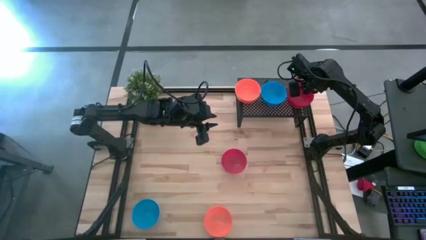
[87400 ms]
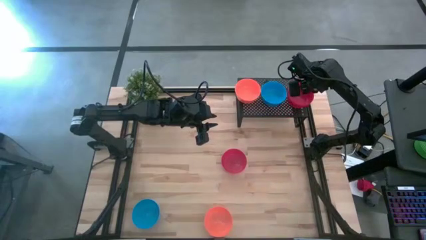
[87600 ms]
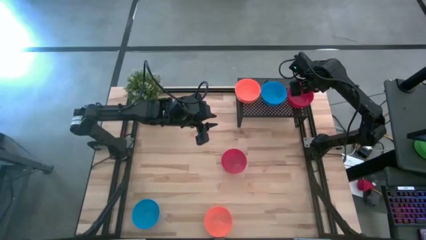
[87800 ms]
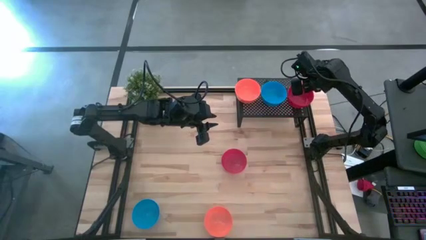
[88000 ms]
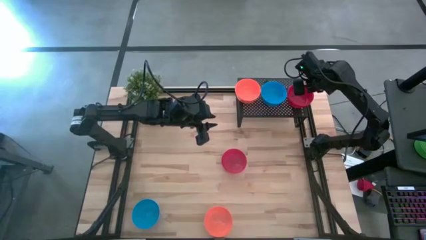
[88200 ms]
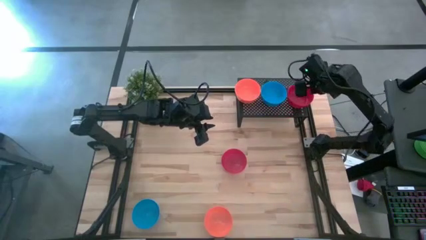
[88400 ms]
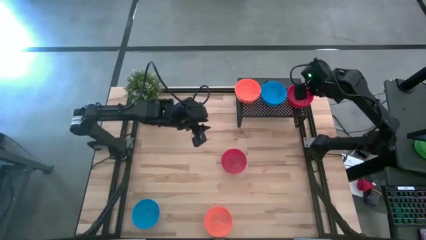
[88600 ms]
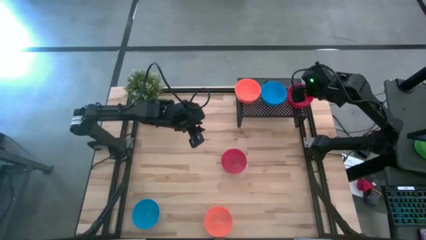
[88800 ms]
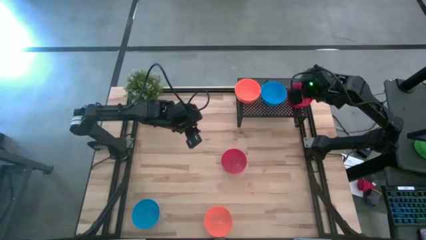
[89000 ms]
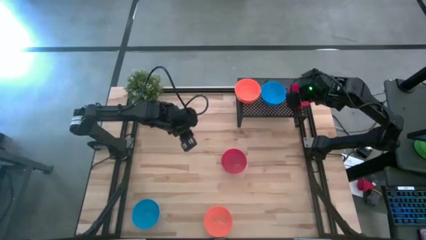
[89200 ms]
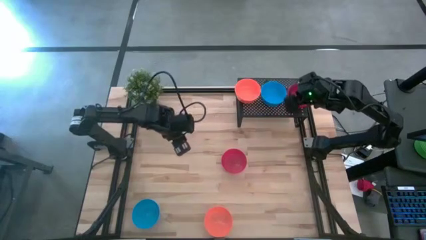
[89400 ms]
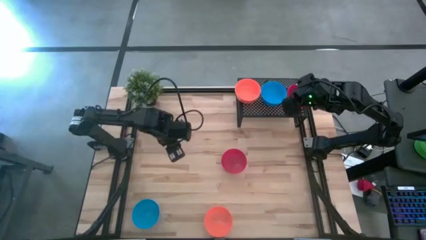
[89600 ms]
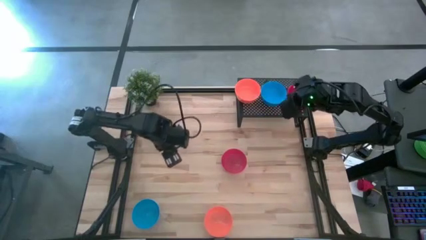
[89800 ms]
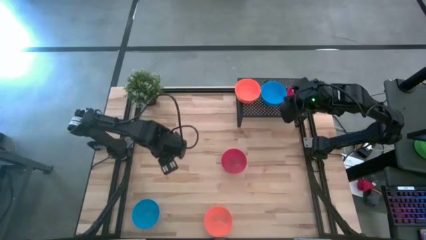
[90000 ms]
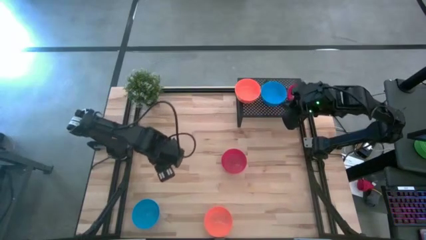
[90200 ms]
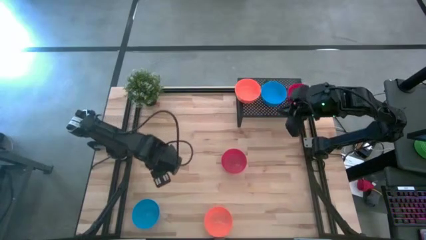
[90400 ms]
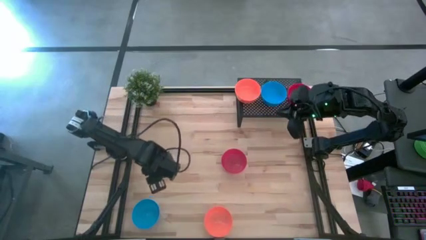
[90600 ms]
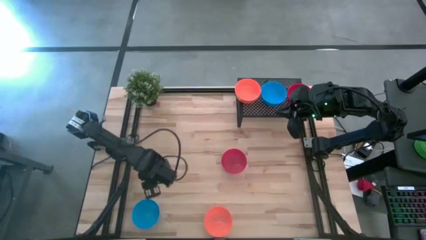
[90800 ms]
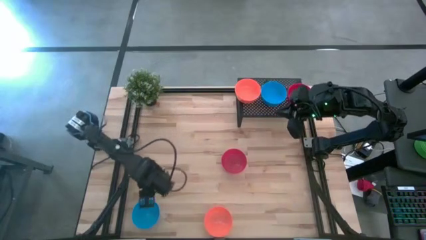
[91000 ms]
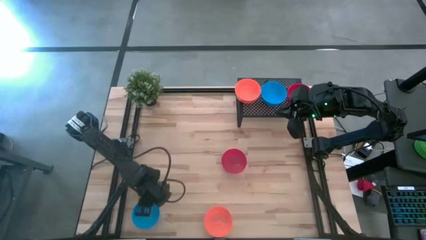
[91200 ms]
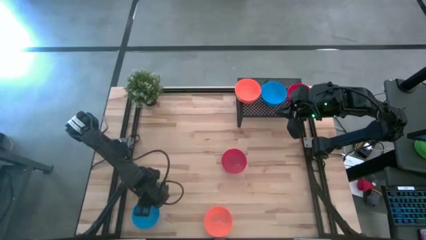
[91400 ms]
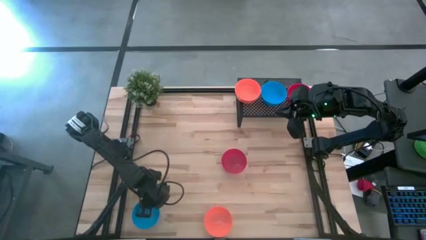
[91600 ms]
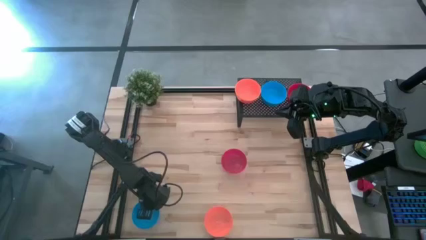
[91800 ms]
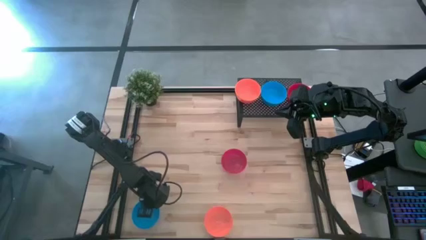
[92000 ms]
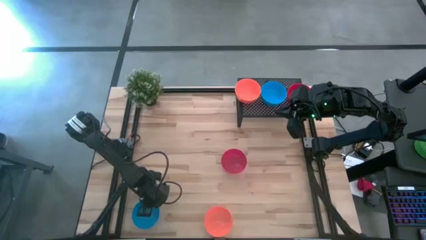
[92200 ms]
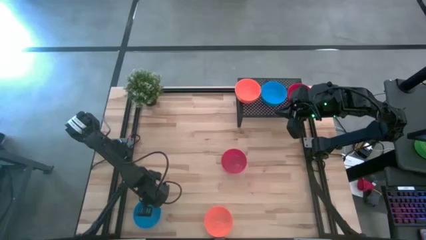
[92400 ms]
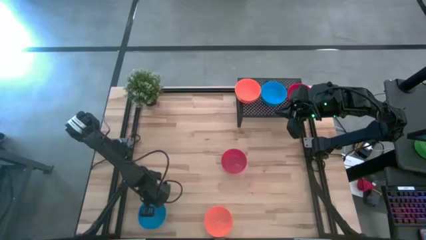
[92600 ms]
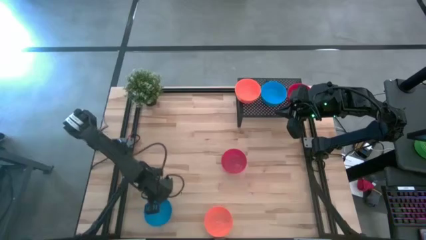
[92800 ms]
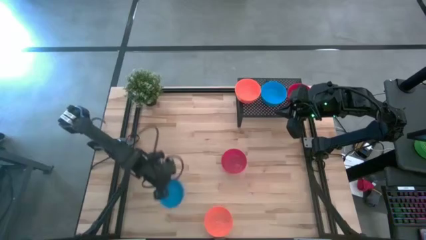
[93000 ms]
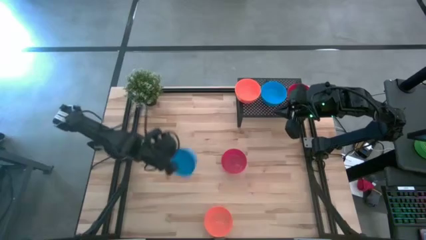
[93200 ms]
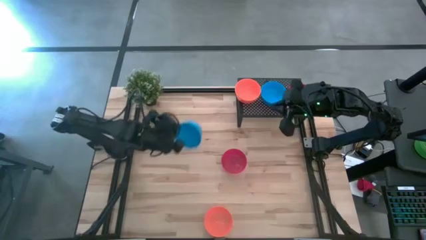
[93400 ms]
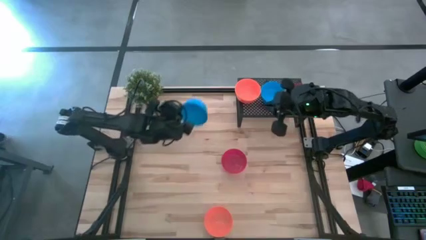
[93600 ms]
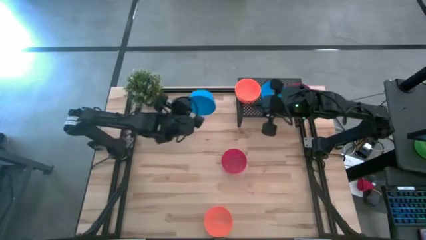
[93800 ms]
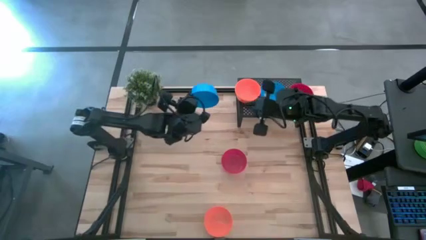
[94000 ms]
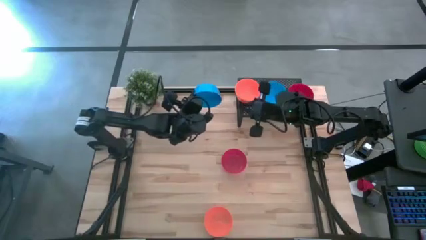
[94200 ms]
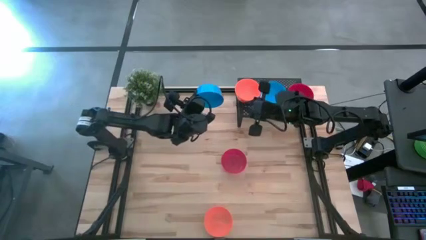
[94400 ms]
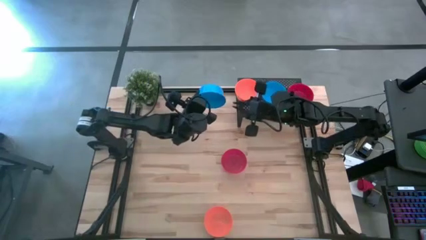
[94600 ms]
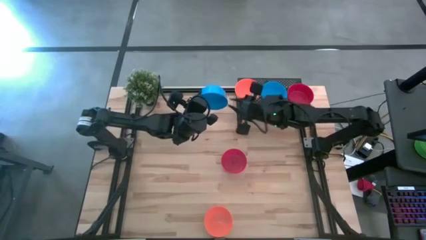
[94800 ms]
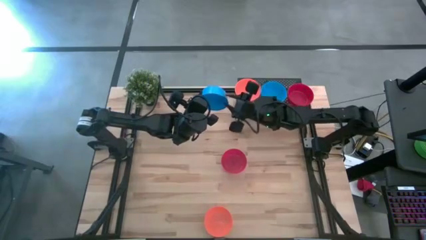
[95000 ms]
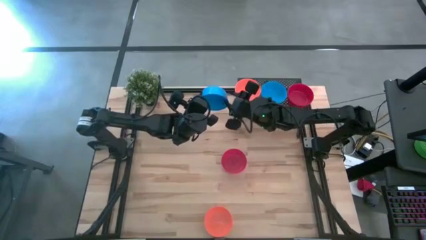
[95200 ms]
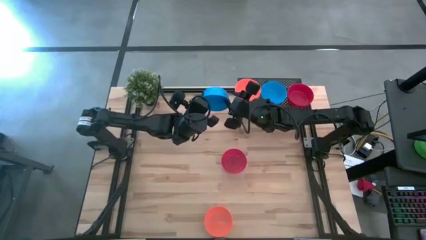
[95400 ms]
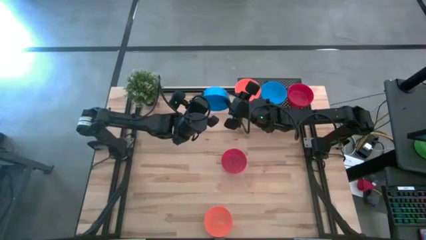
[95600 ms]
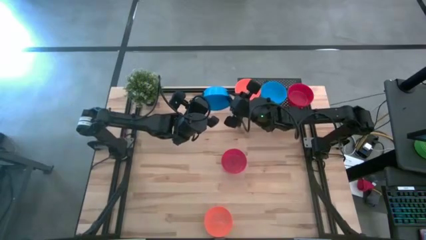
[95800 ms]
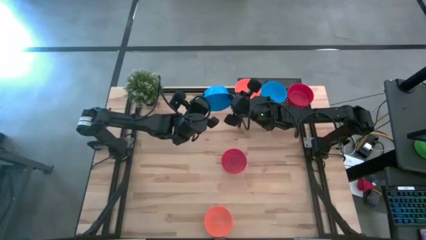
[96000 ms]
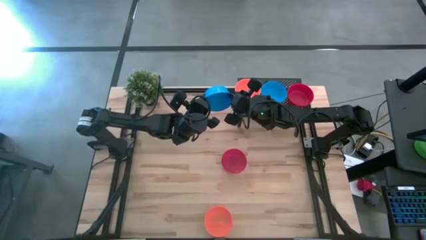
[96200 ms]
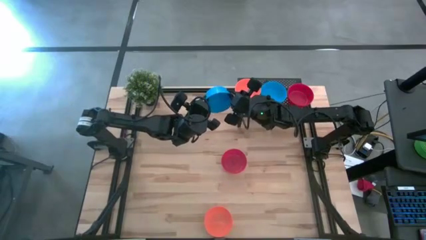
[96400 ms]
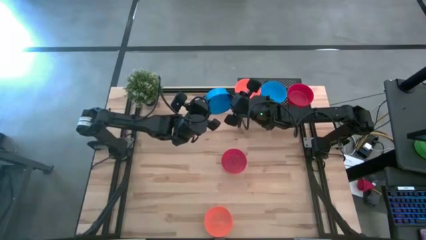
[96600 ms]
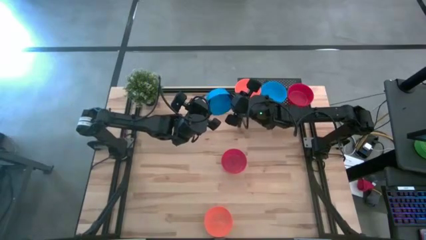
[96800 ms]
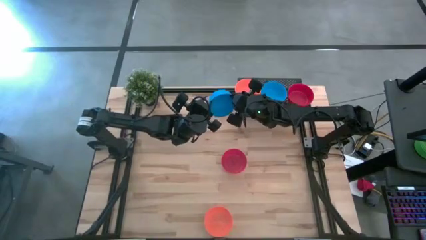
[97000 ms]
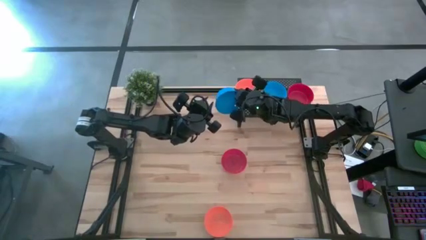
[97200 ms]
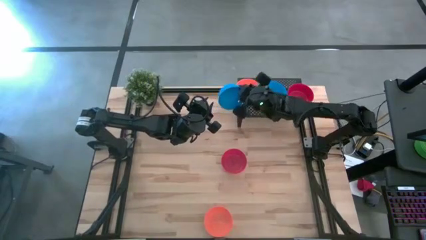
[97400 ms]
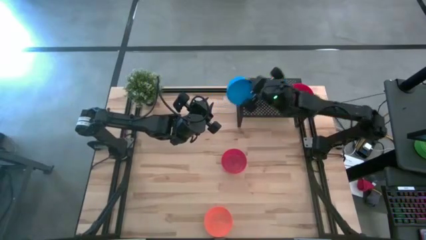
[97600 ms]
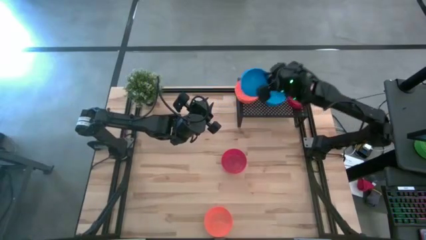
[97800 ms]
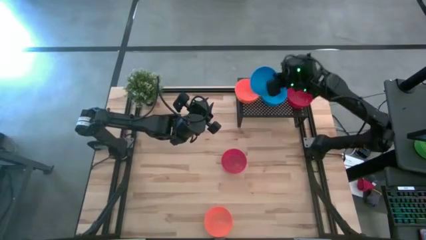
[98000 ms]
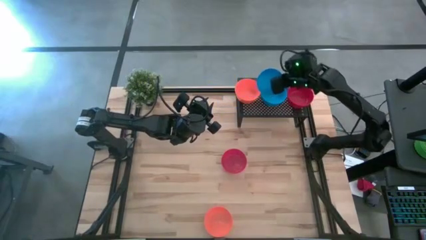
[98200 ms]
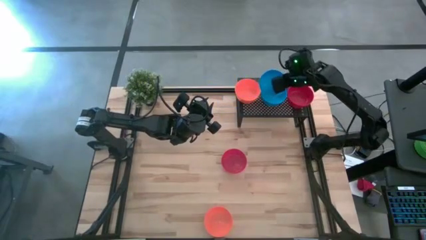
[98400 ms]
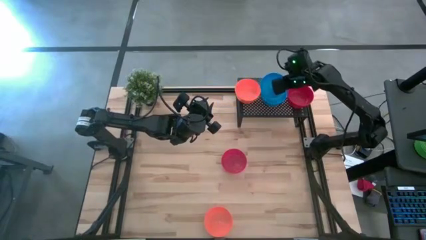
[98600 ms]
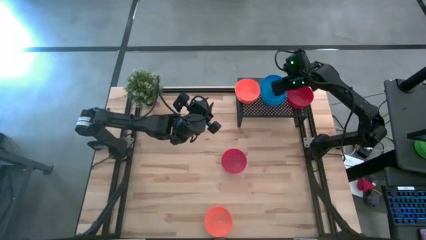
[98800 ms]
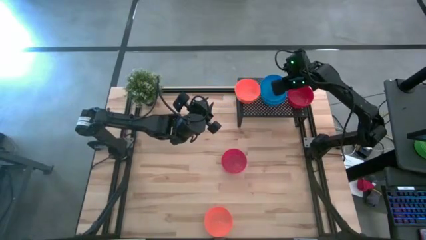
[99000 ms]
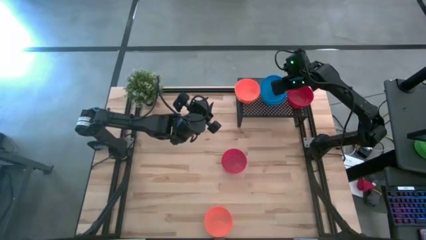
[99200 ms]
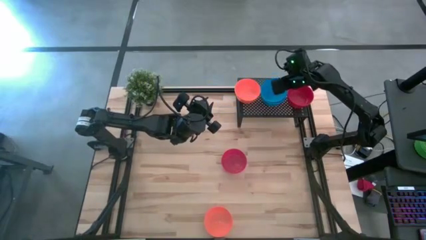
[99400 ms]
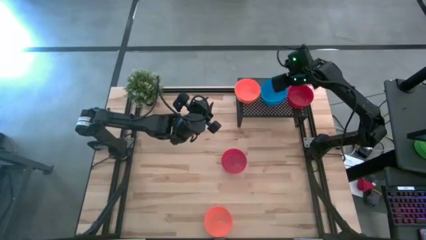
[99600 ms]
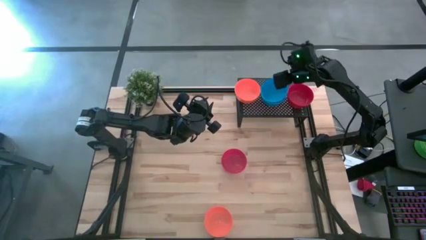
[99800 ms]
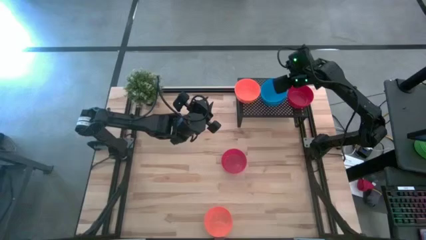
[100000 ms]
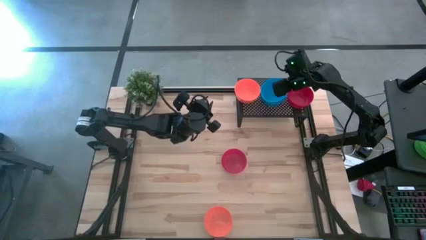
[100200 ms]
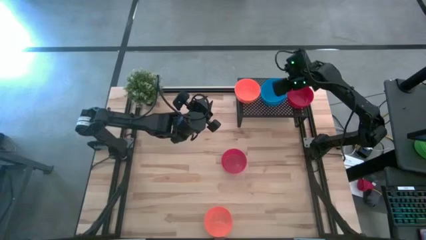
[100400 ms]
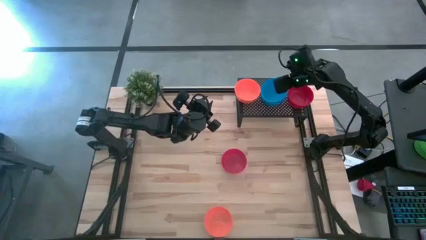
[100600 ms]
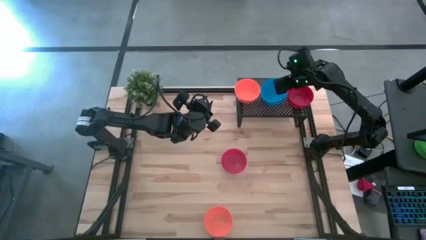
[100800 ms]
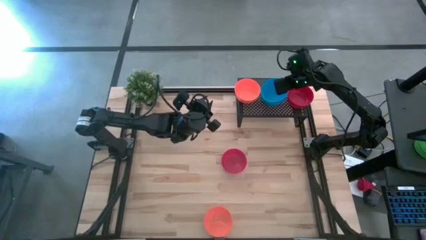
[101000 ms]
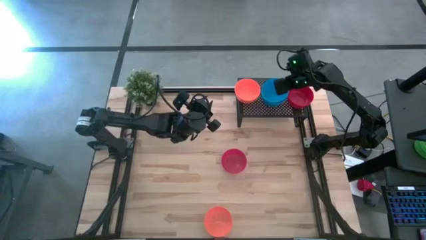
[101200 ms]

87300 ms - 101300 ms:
Task: Pick & Place Mini bowls
Stack the blue bowl on top of the stacked blue bowls on the shelf
